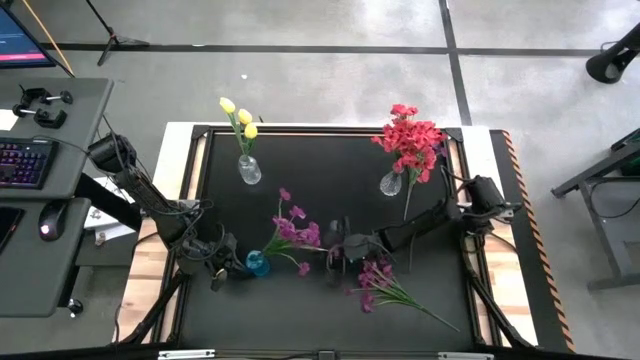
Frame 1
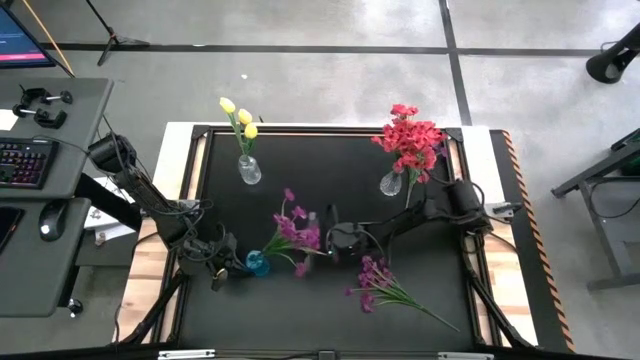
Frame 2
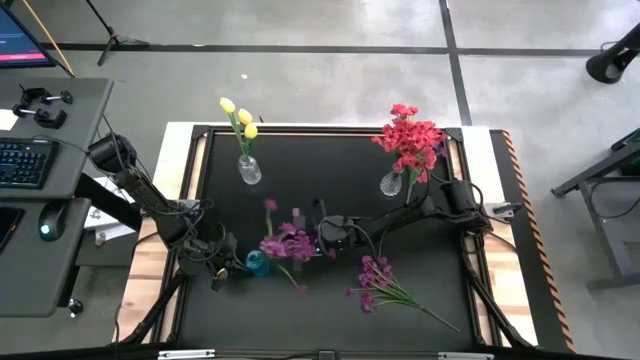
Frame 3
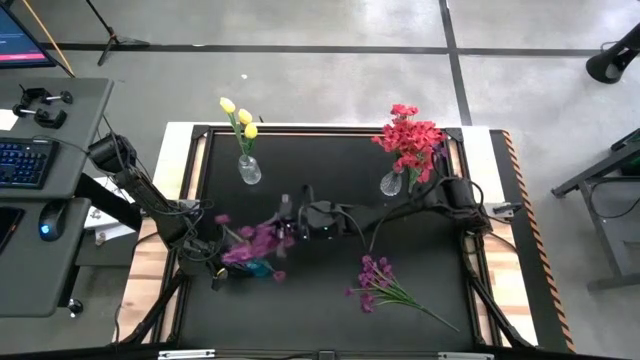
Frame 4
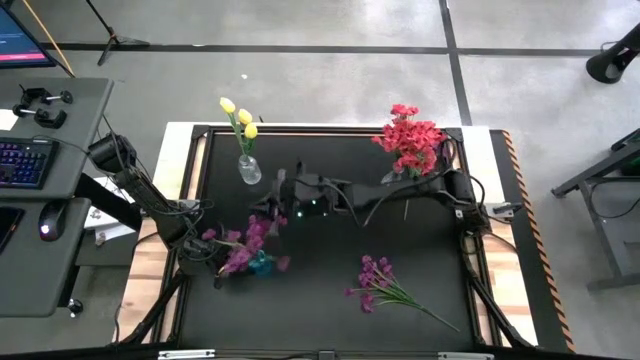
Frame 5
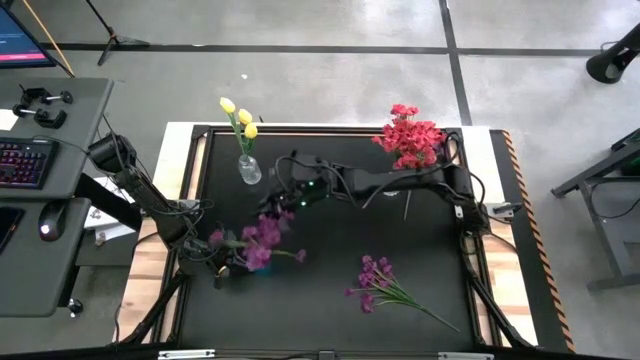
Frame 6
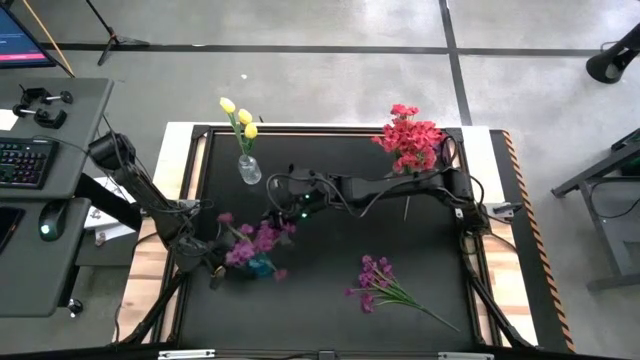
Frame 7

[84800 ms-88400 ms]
Task: Sort flowers into vase by color
Adjust the violet flowers in the blue vase

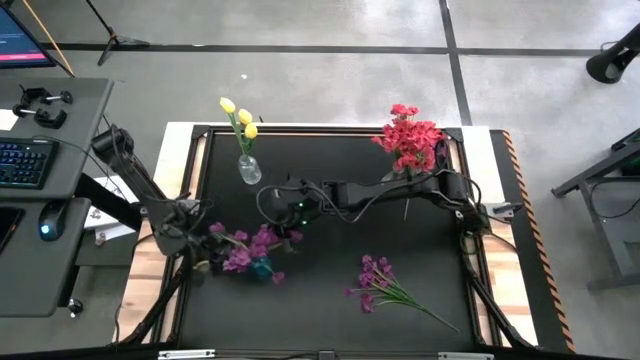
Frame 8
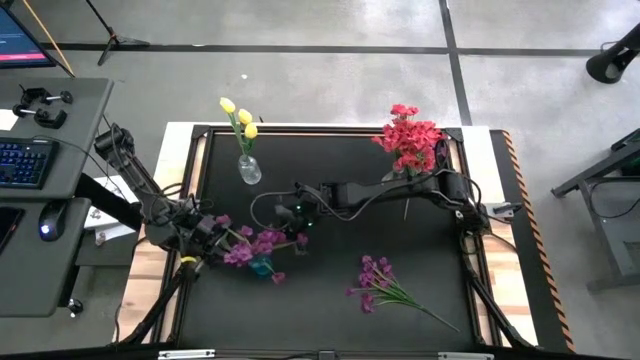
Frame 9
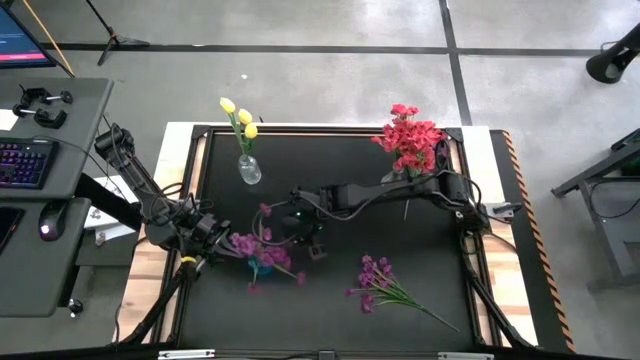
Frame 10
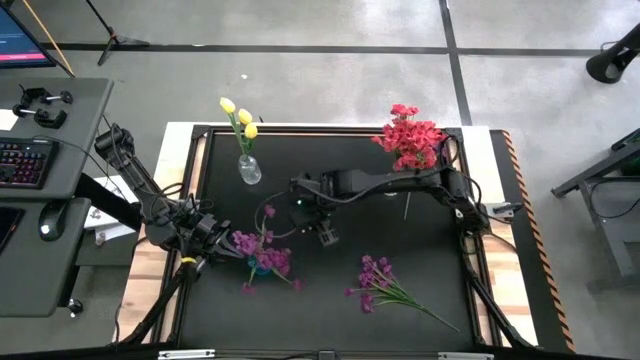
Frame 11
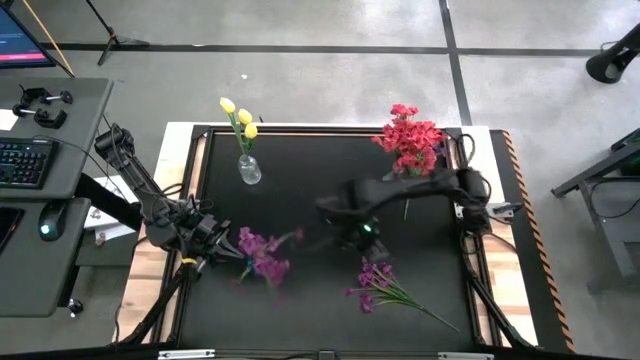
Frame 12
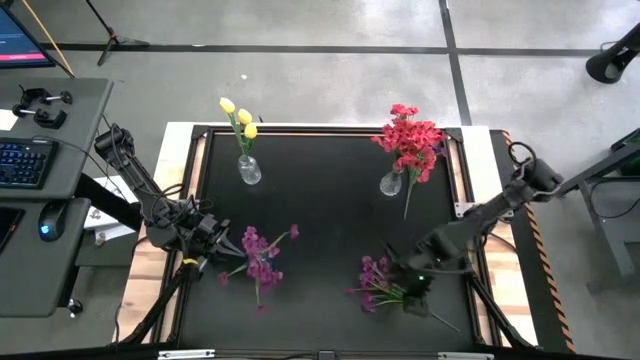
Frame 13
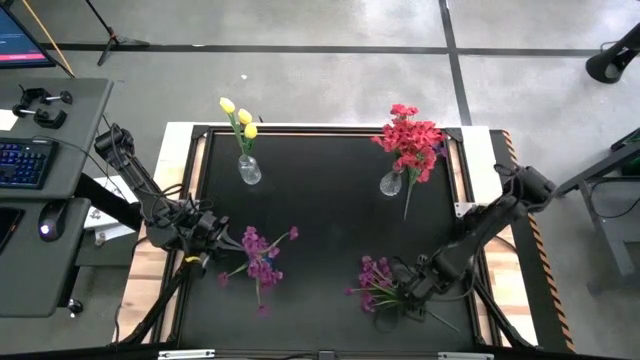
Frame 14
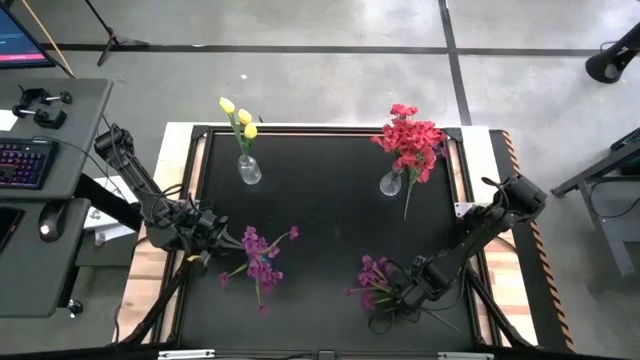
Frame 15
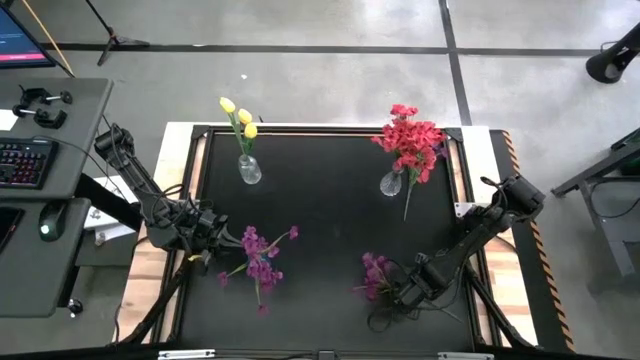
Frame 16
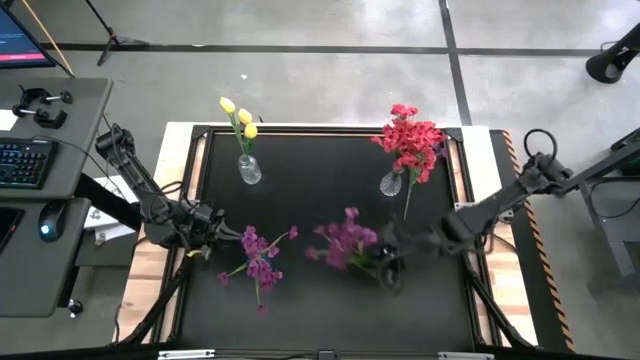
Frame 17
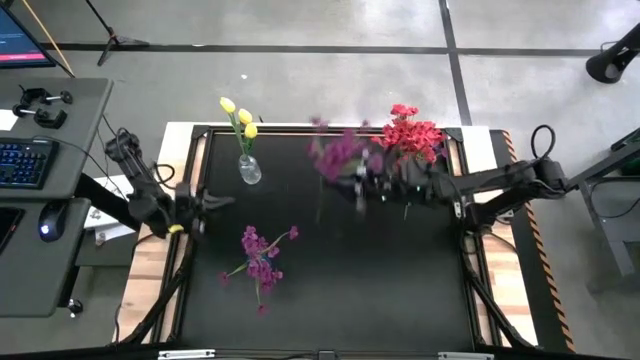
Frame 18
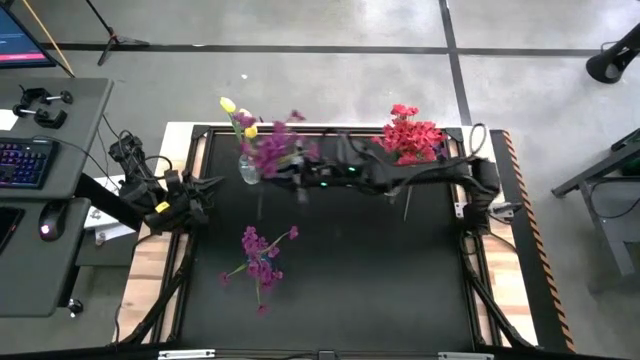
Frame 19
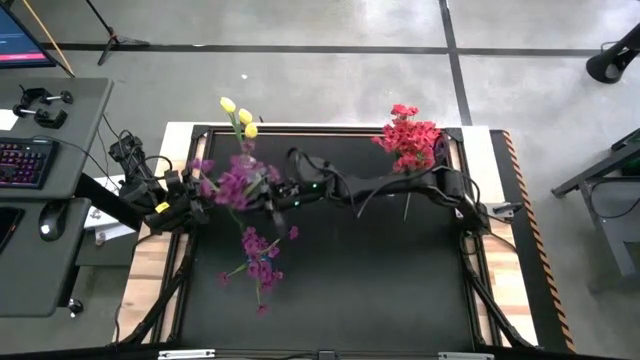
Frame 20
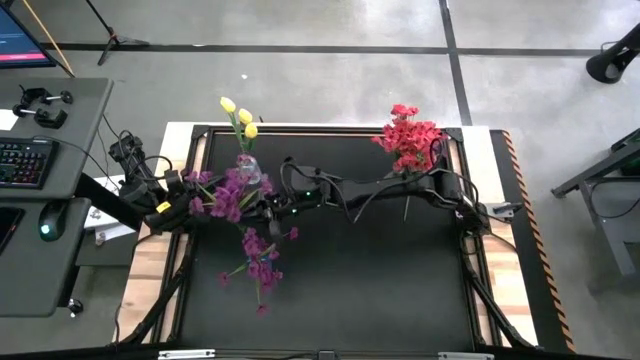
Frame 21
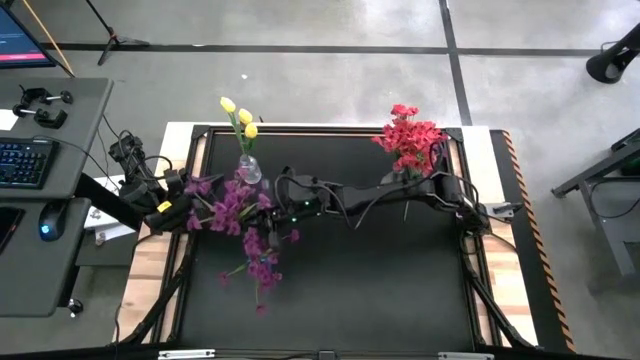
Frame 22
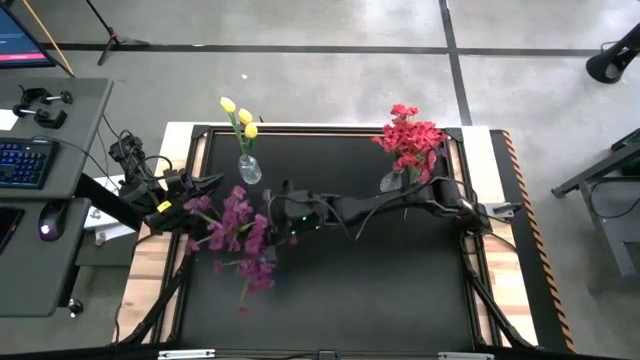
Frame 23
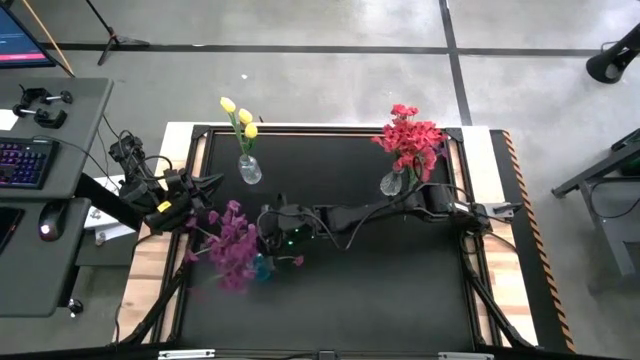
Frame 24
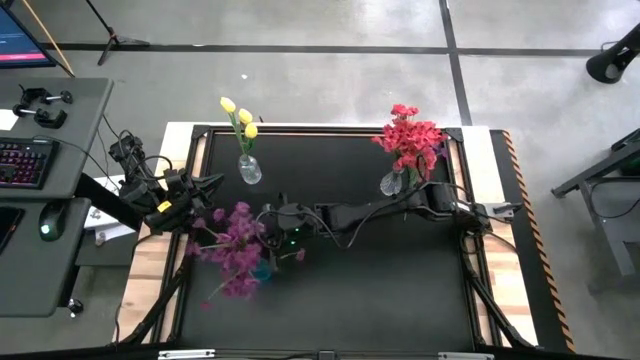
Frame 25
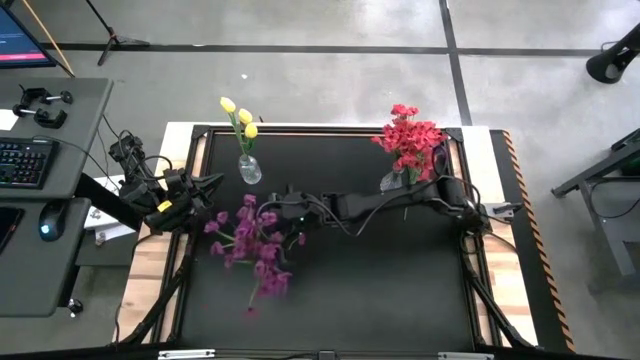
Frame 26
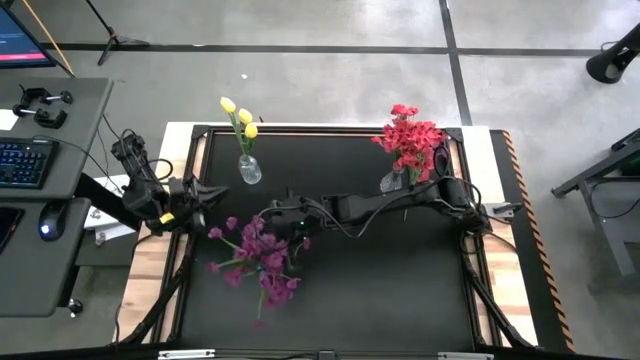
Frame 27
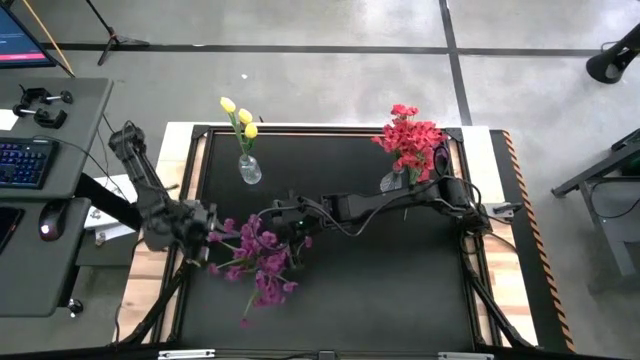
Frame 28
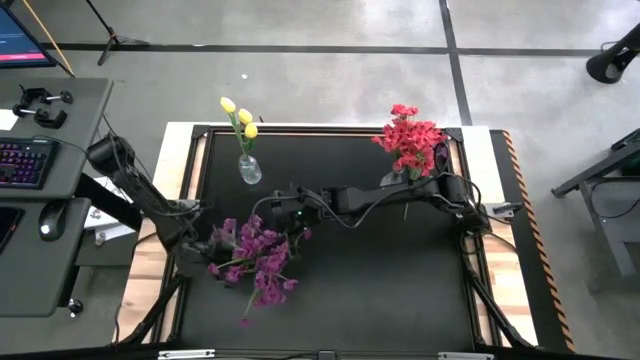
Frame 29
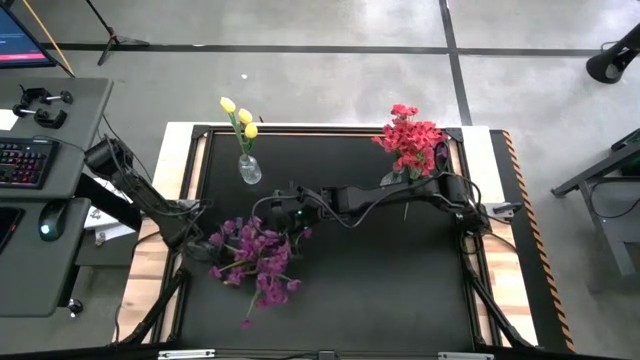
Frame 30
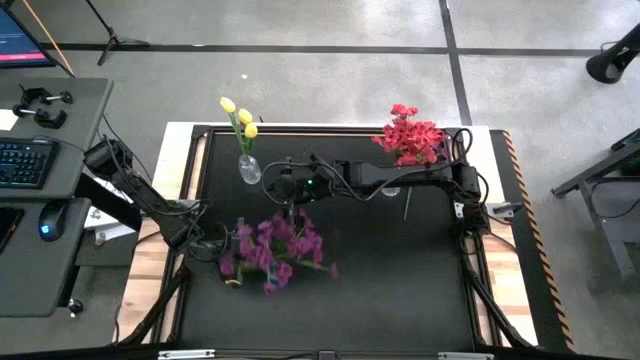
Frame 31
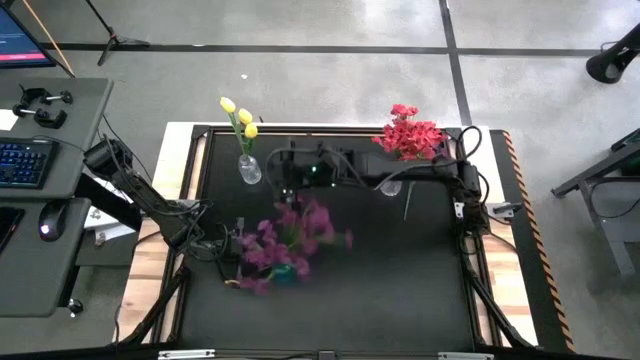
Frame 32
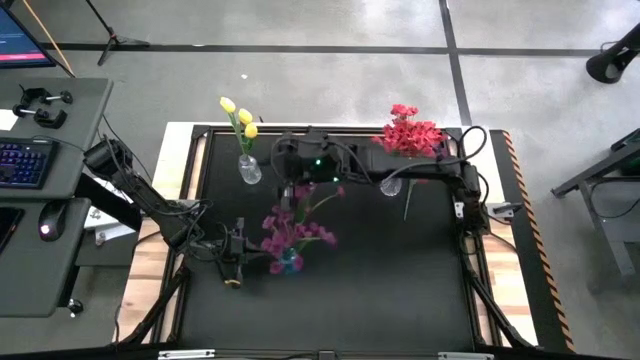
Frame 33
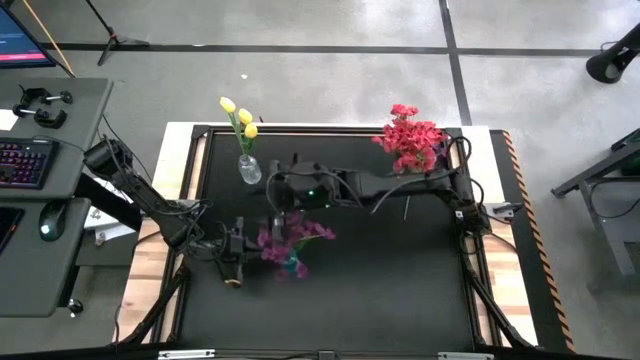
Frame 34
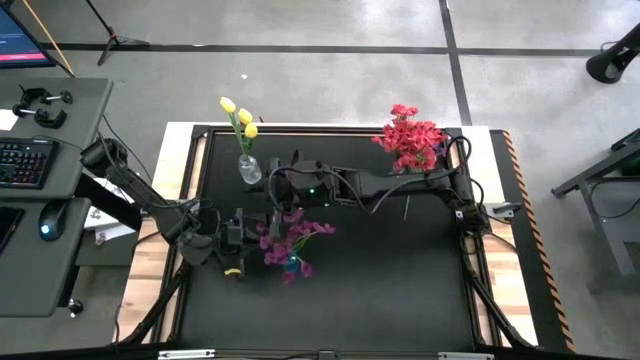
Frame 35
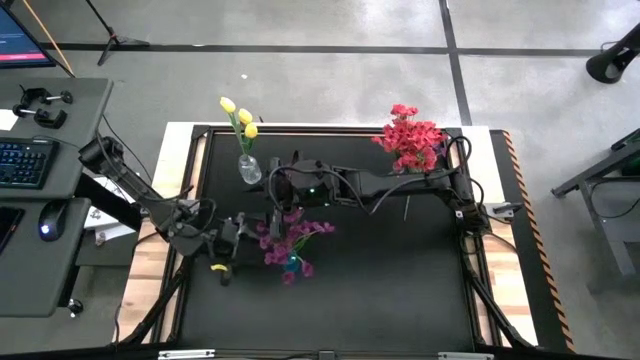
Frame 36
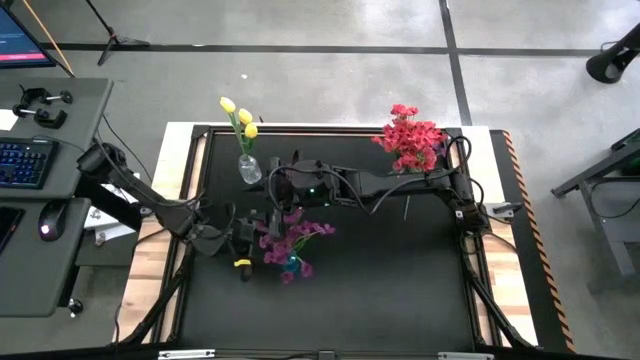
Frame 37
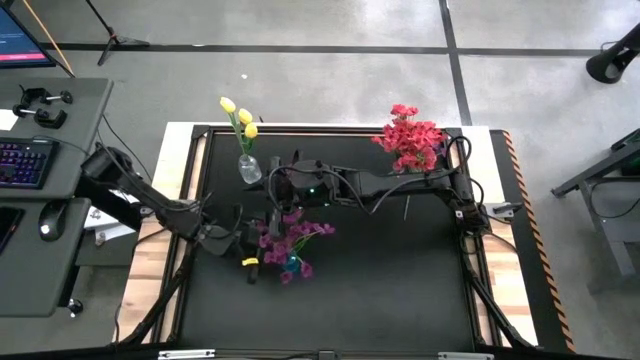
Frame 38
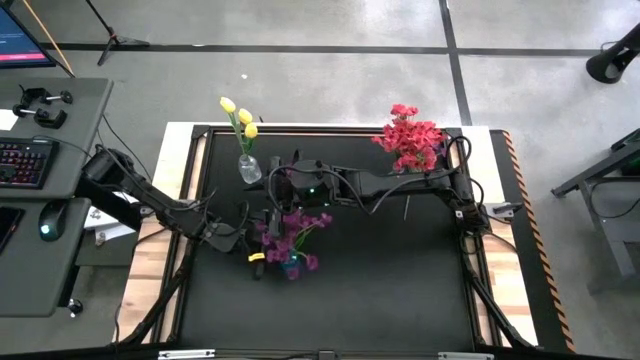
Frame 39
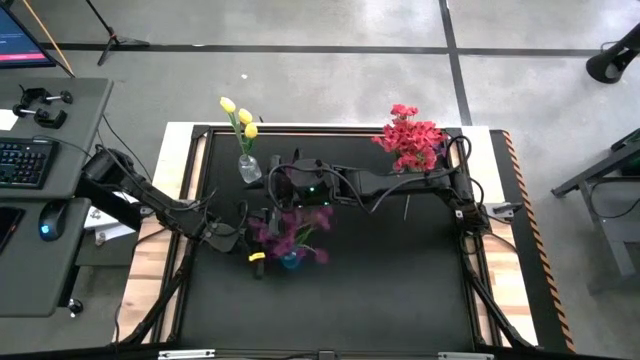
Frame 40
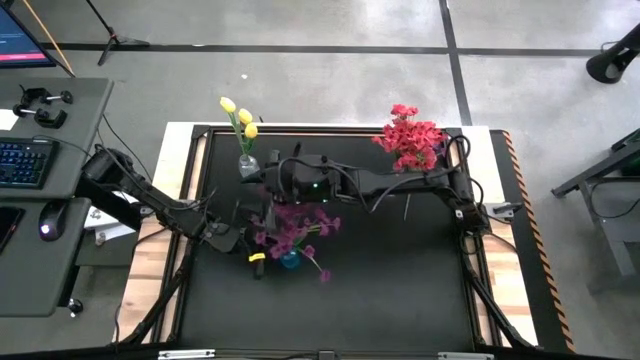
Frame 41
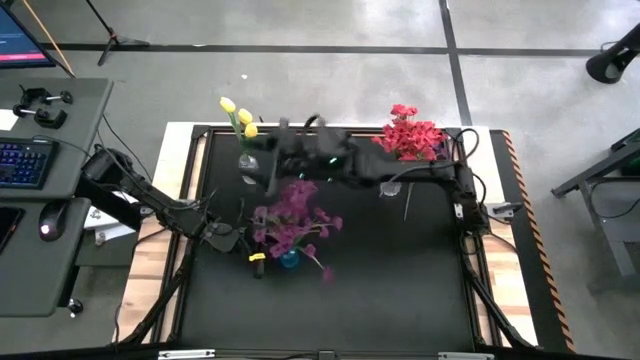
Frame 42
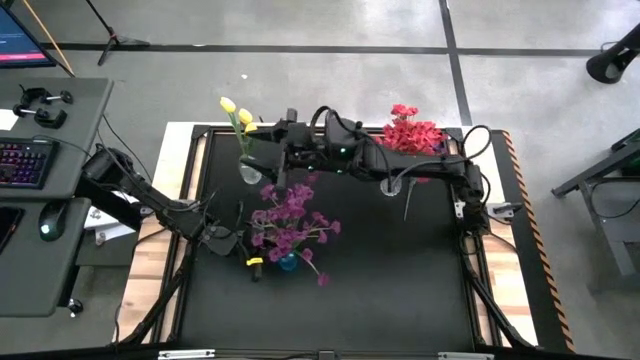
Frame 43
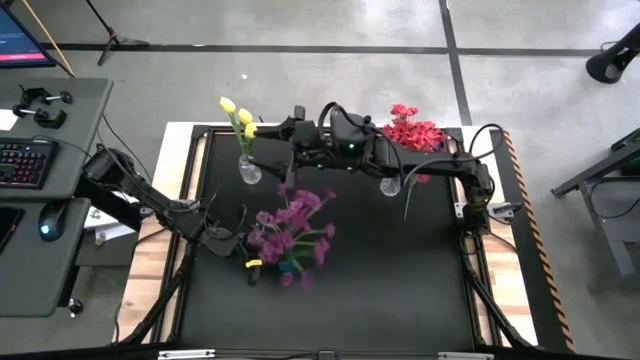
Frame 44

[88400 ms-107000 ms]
Put the bottom violet flowers into the blue vase
